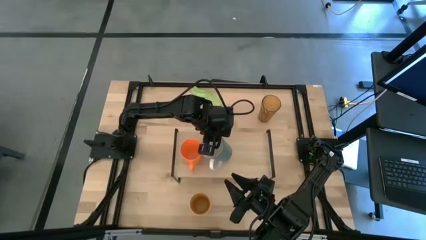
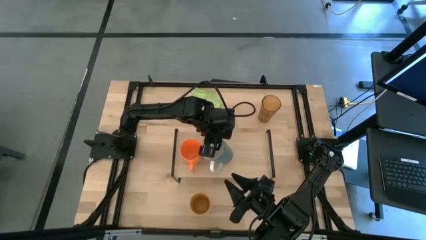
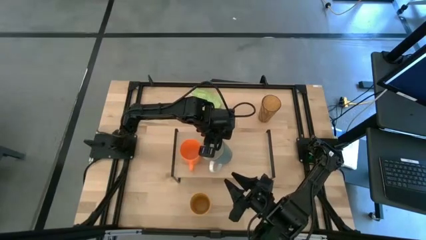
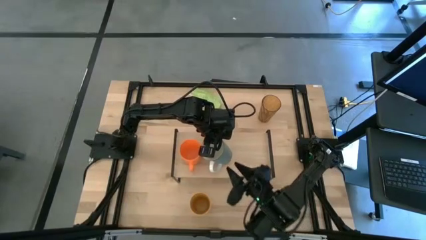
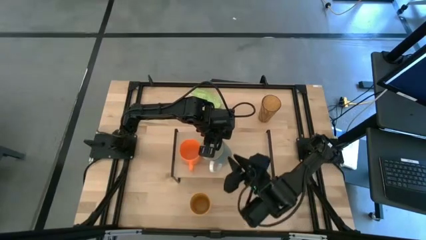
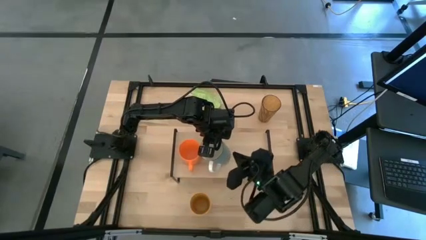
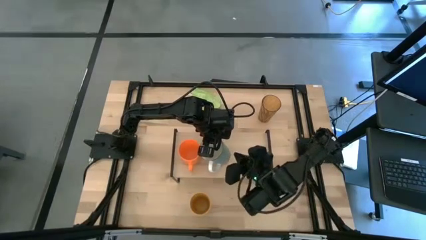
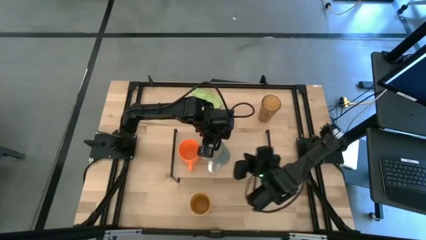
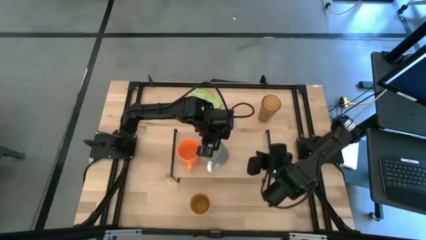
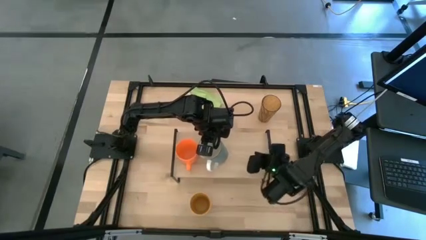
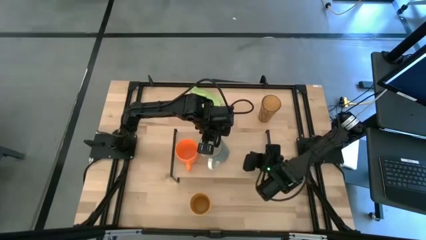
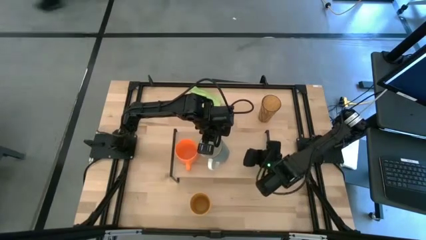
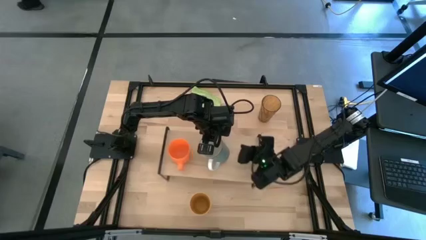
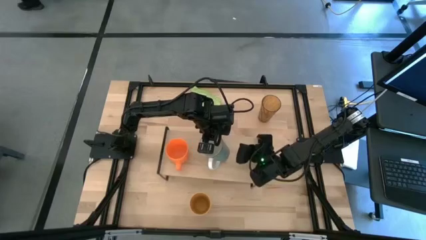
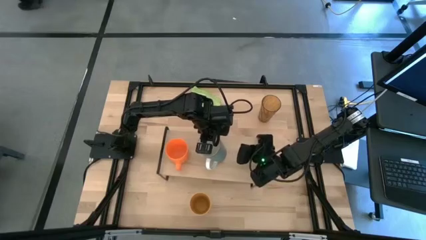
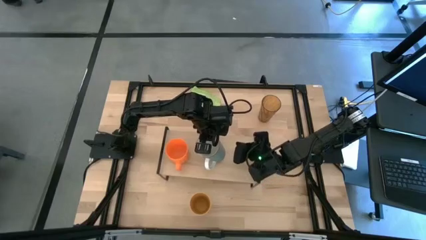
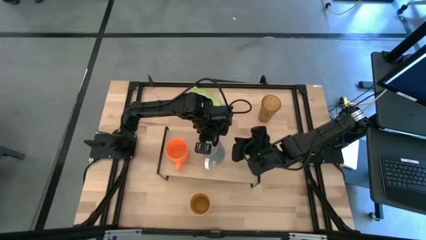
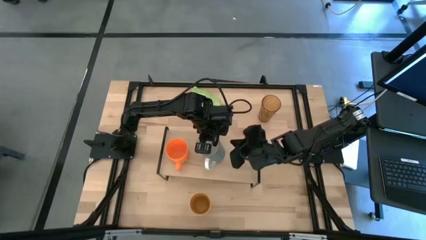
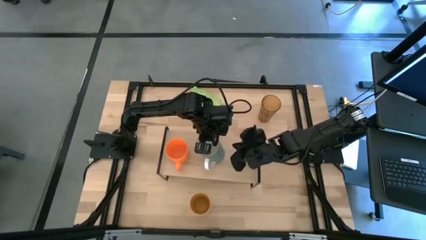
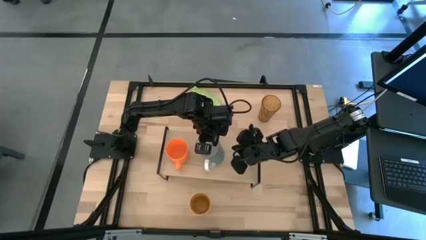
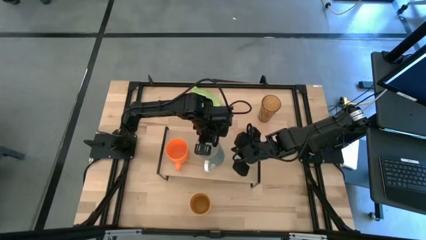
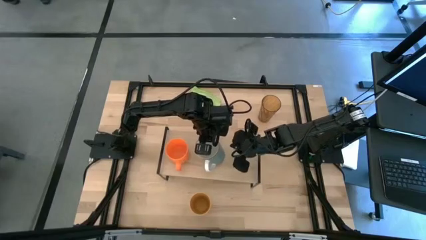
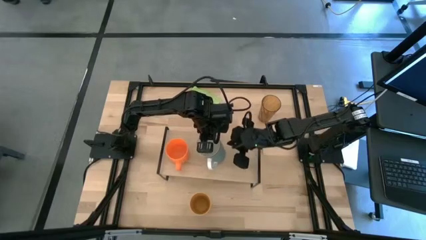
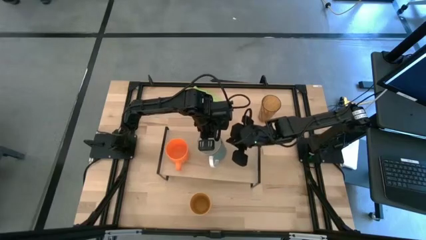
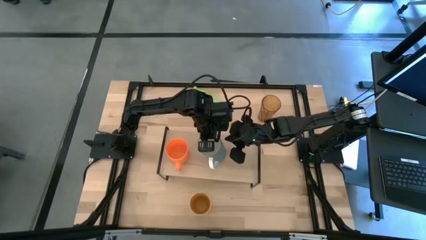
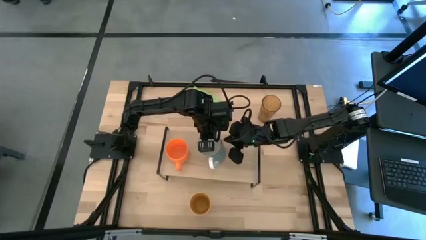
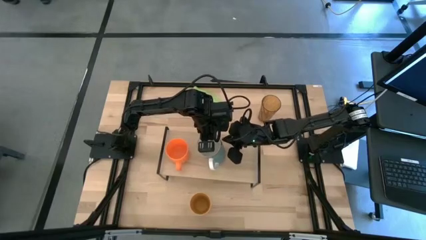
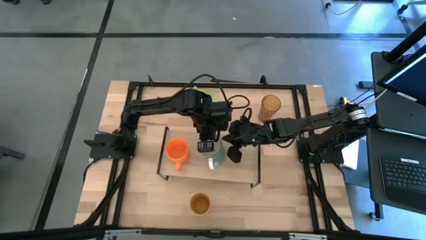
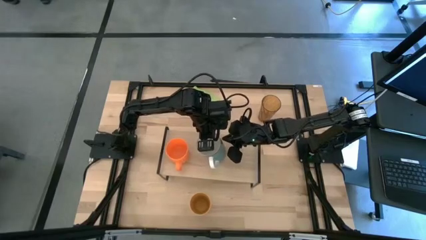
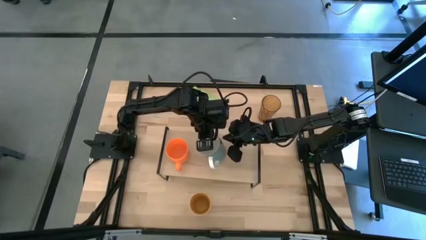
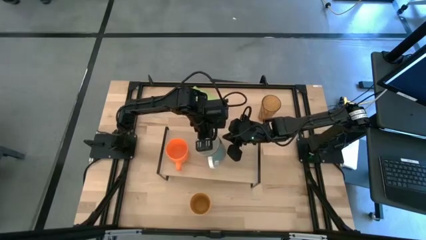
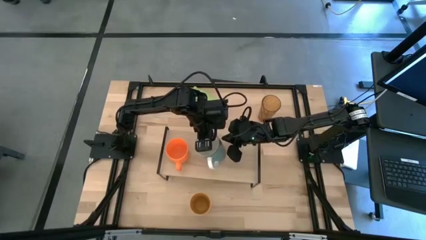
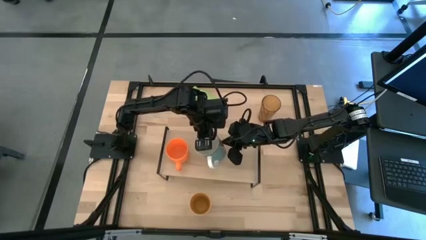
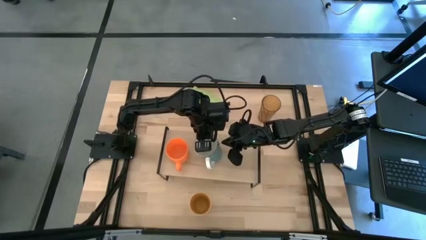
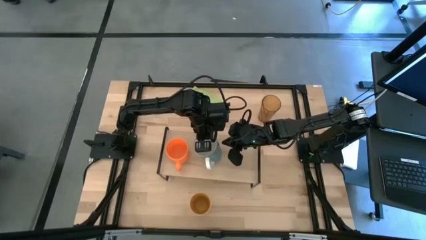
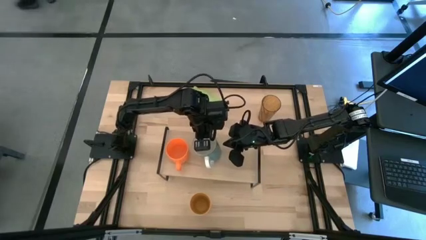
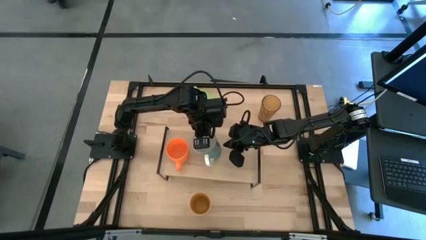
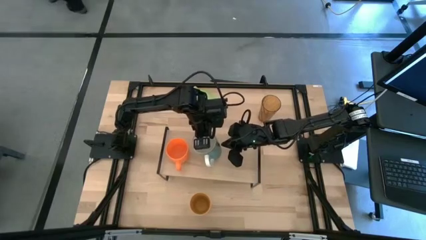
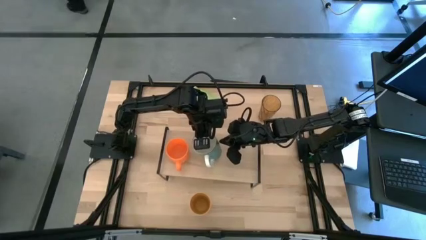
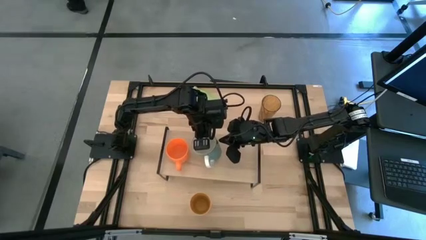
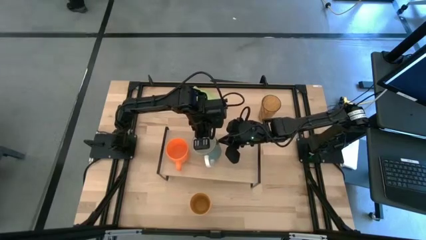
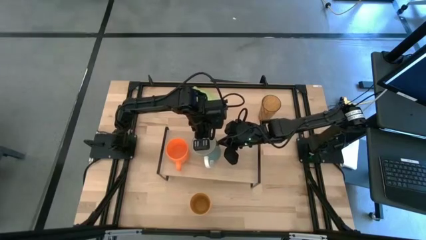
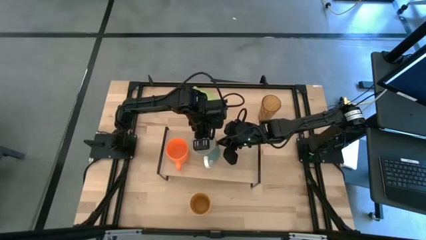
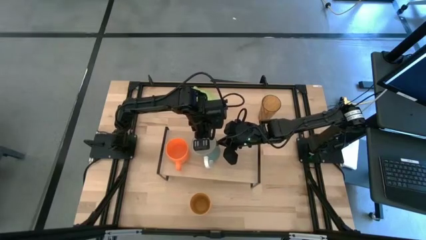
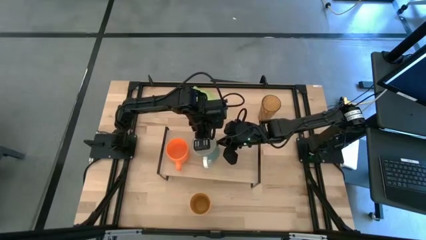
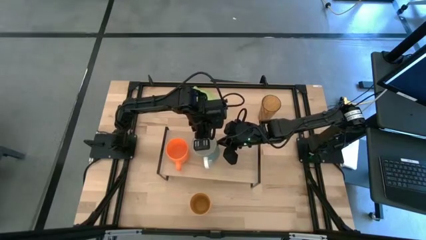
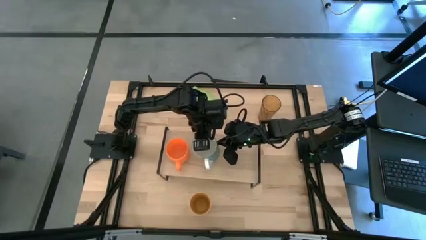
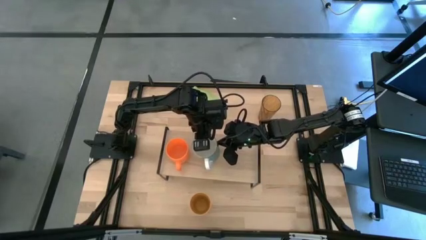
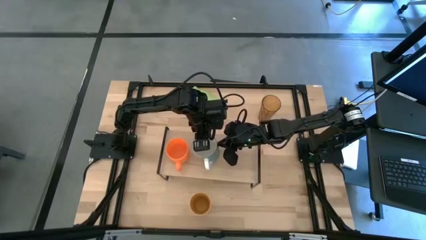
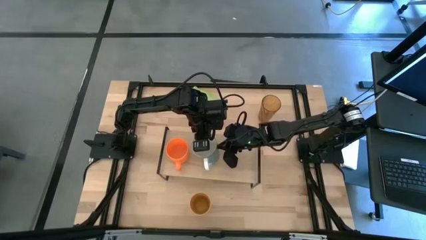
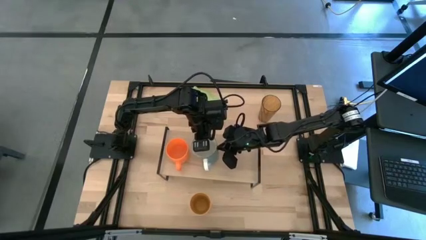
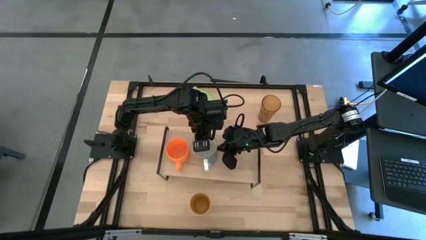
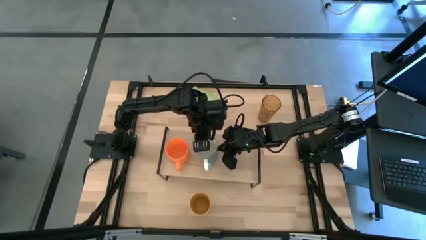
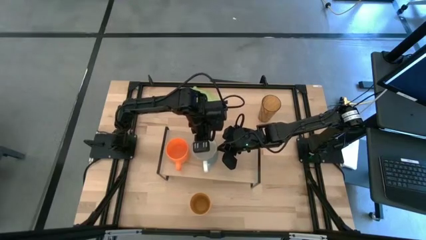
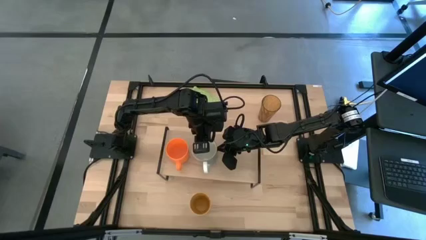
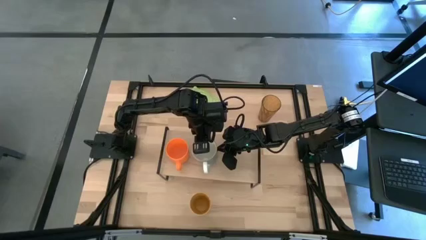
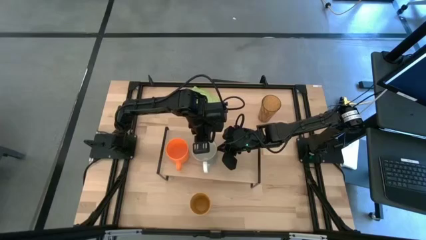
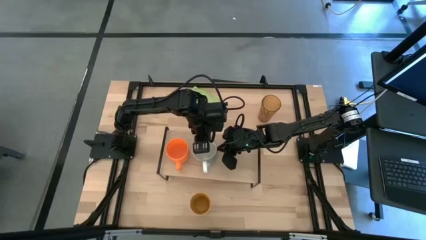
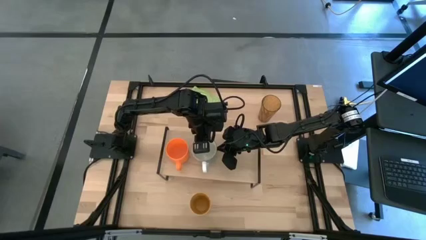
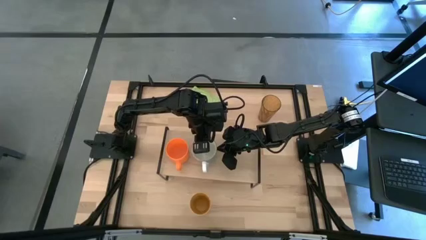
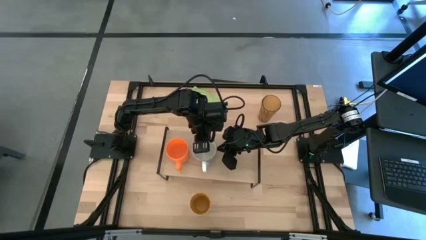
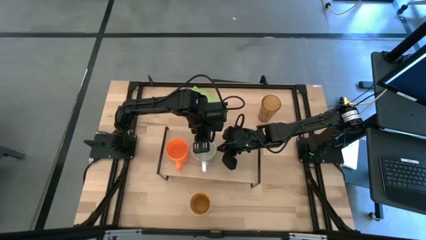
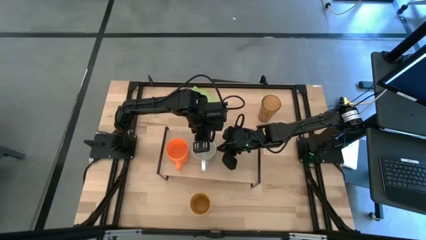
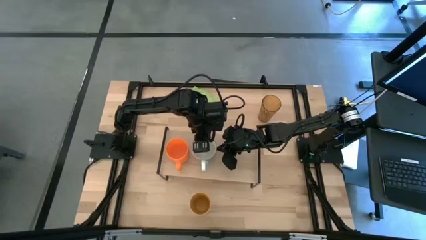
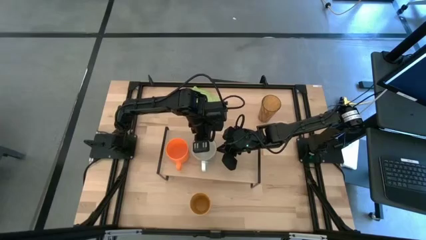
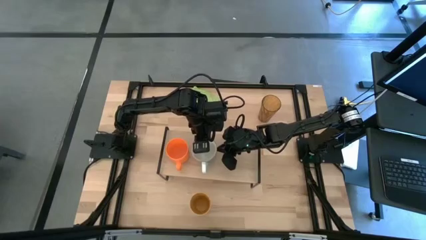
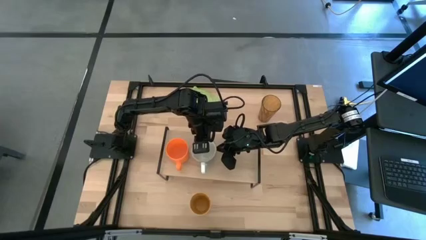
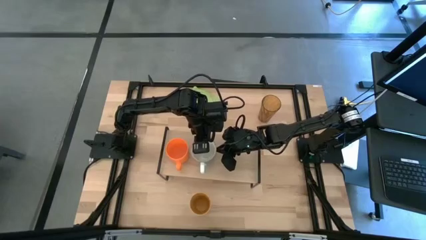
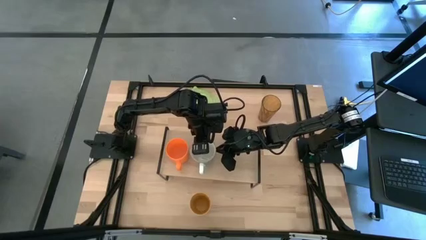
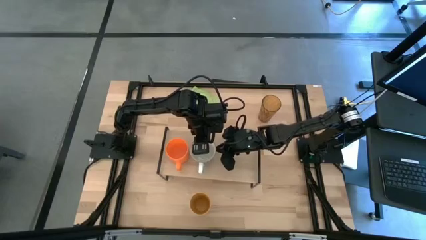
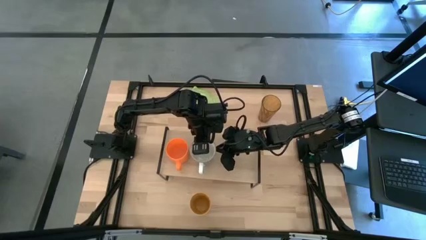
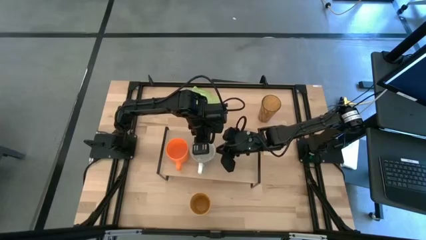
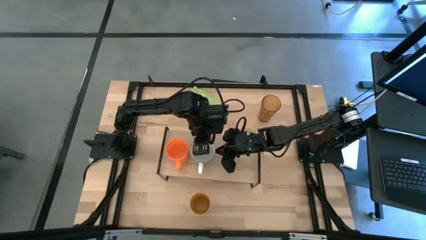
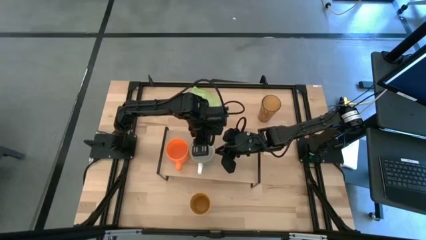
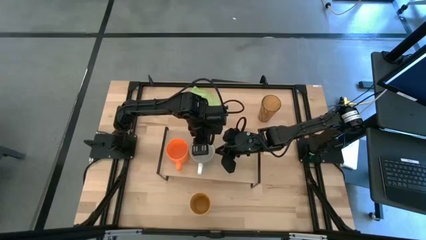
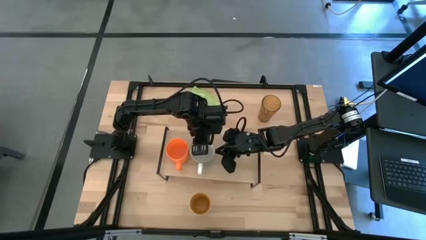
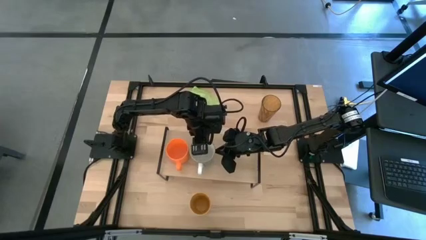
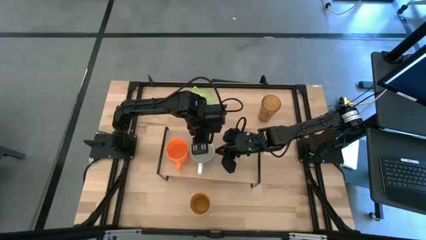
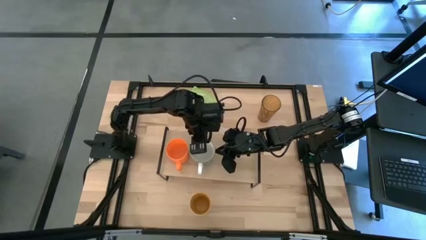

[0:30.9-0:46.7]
Task: Stack small to large cups/mugs on shelf
Put the blue mug on the shelf
